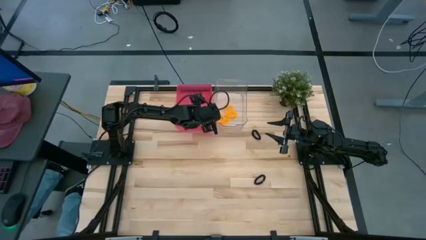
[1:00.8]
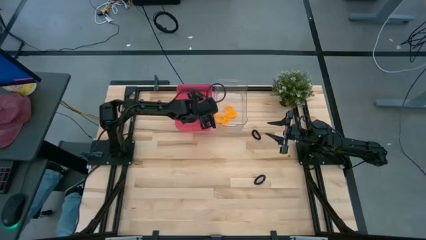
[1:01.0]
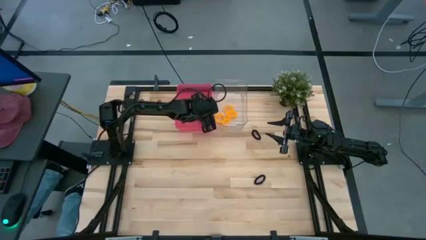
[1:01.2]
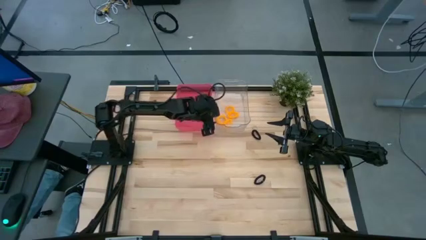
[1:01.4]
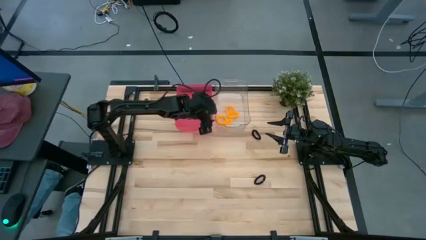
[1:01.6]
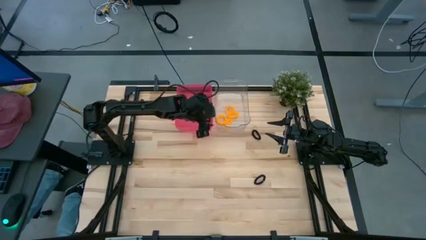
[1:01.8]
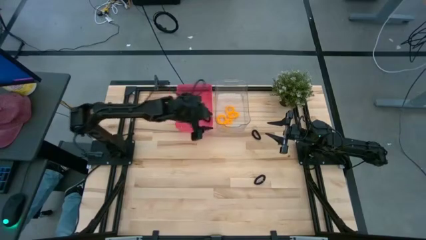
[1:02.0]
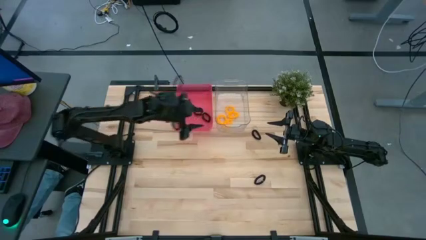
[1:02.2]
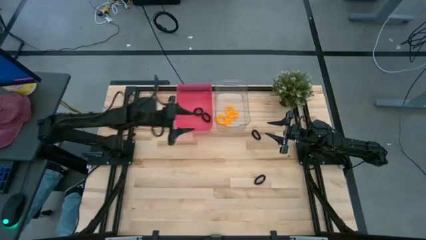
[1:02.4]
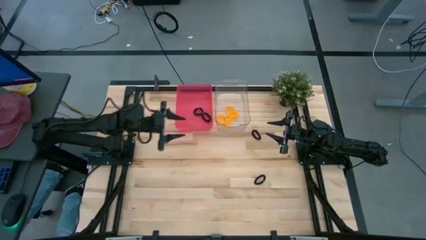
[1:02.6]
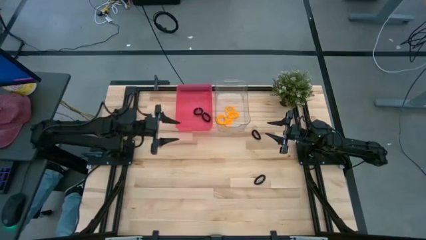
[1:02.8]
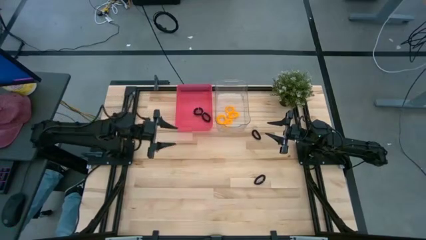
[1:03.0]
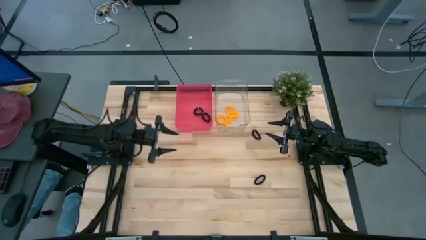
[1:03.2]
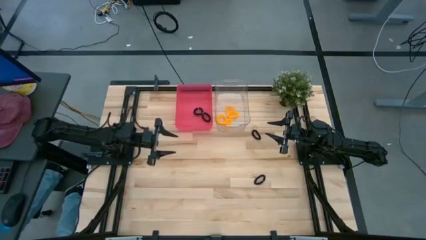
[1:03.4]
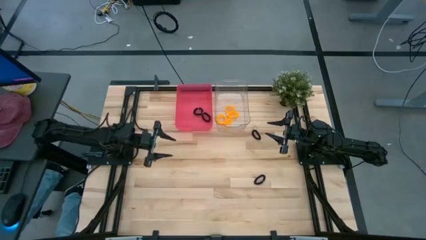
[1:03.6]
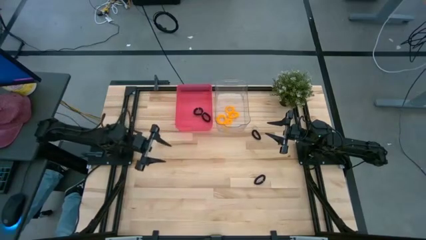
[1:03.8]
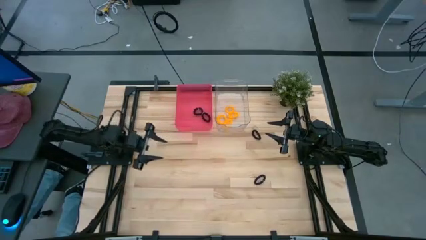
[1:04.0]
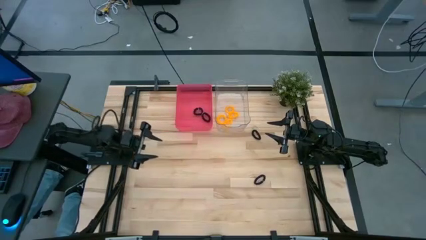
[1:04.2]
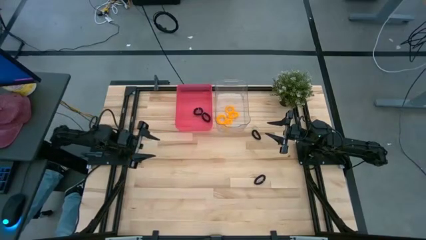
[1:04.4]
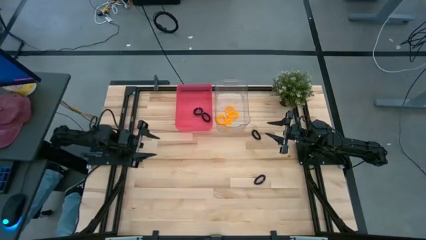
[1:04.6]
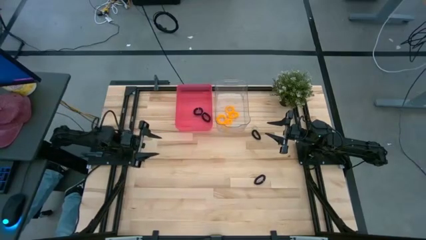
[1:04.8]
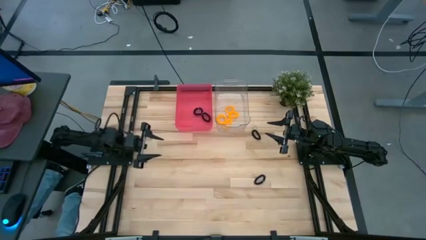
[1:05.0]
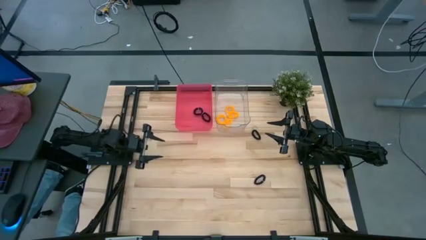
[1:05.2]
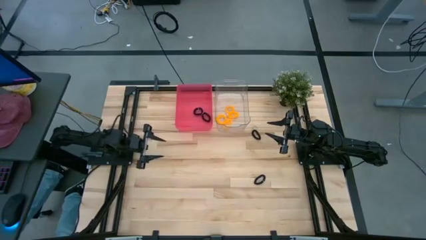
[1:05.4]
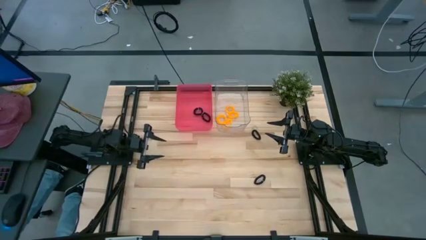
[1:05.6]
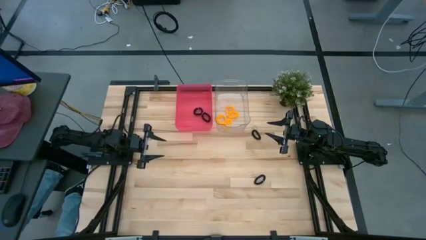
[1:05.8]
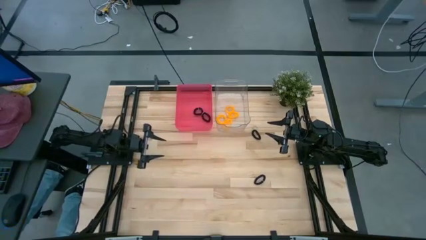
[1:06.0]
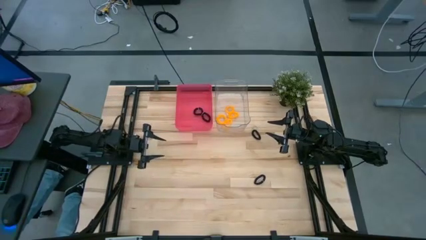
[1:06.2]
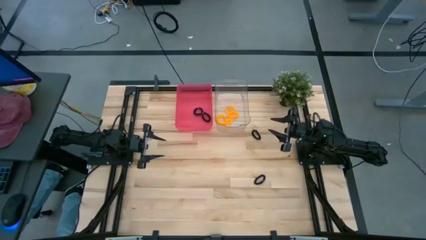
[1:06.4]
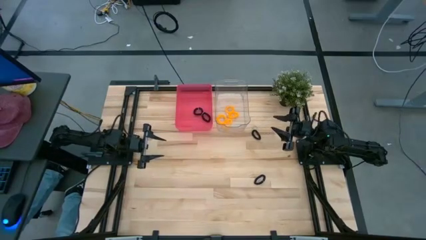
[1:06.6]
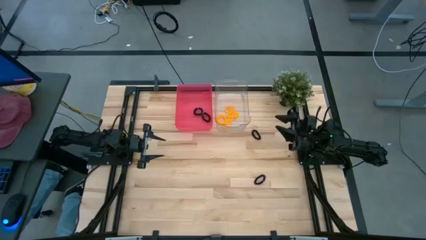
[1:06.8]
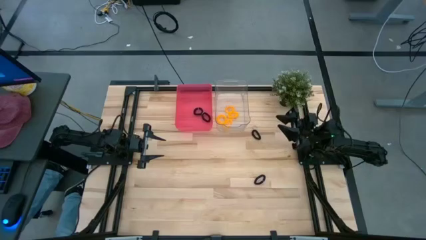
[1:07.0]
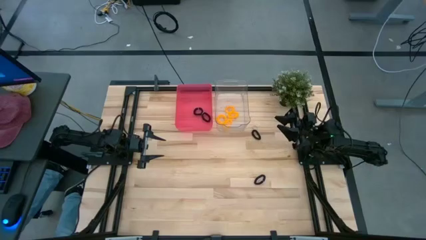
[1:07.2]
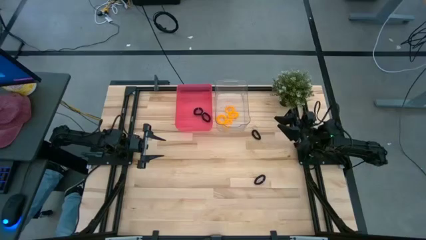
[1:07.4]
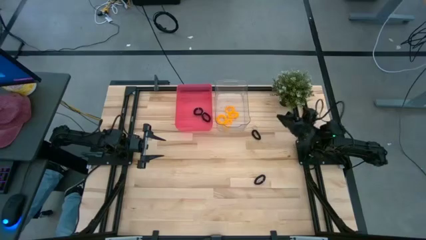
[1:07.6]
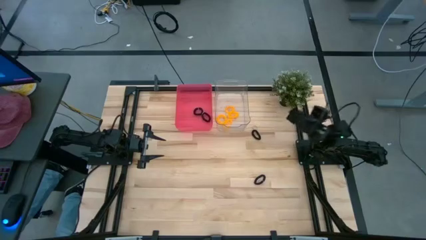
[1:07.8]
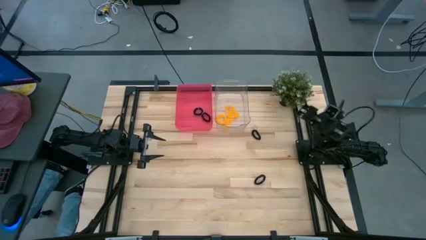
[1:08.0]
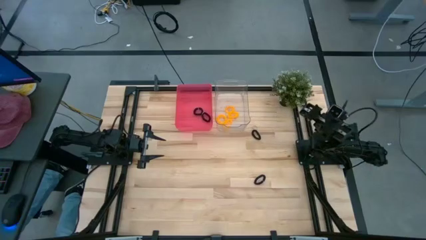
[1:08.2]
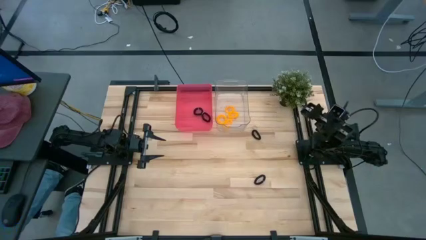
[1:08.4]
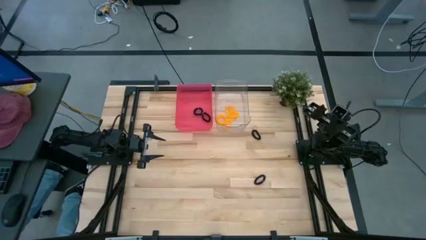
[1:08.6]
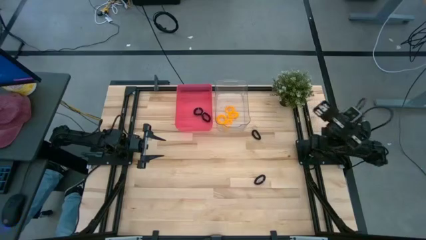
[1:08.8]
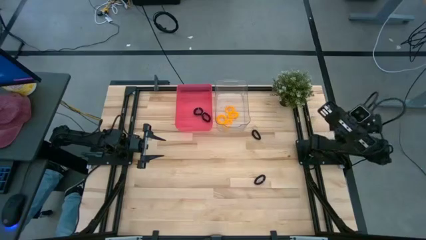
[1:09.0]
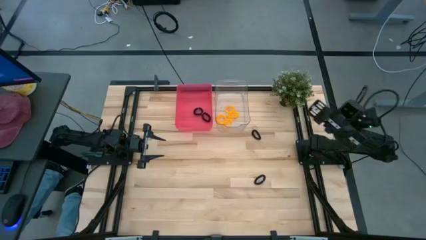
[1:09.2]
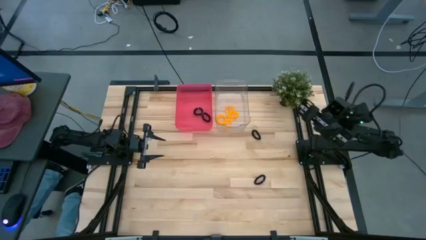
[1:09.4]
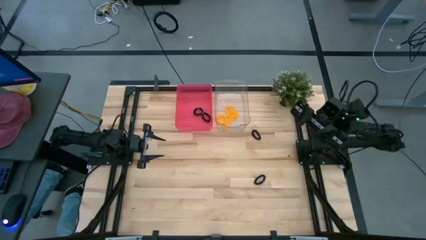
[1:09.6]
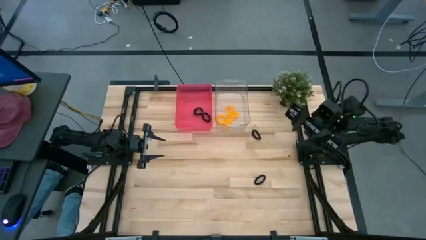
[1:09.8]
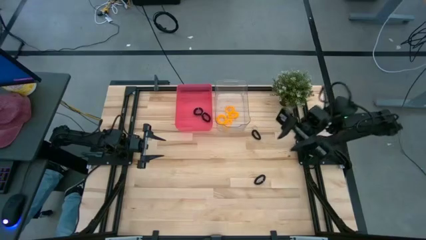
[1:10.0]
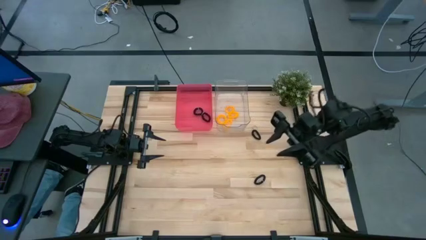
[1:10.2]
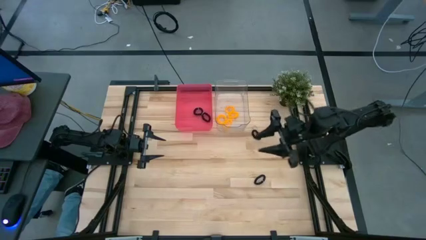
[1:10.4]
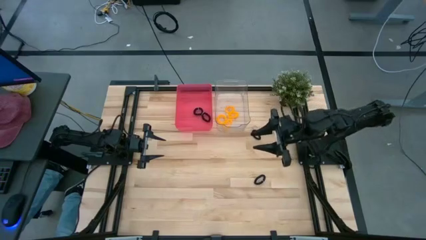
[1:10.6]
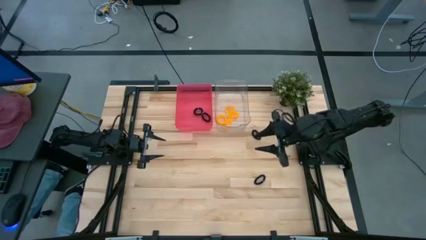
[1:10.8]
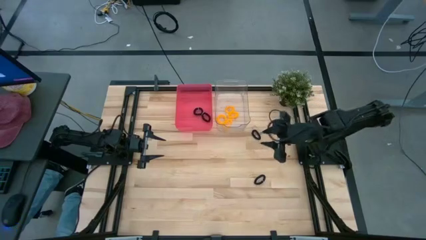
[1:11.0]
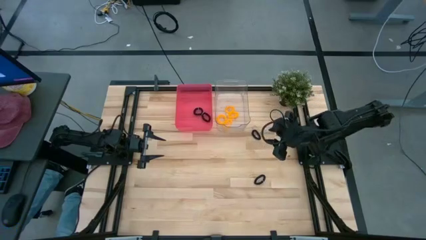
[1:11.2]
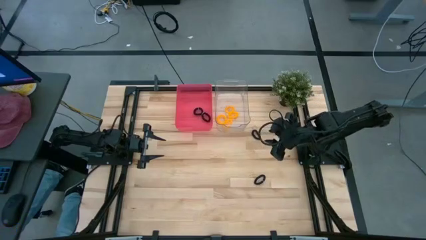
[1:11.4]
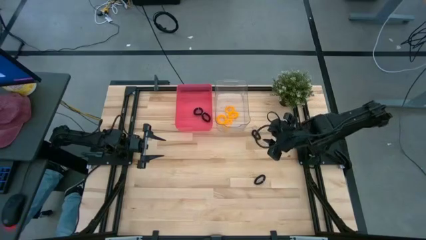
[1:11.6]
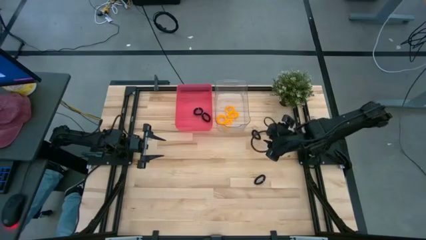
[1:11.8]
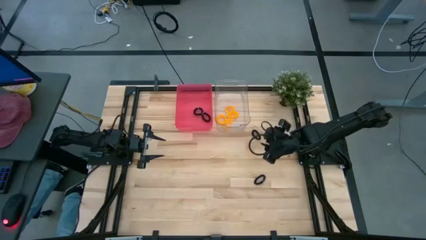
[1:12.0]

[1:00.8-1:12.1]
Task: Sort spring keychains
Put the black spring keychain into the red bin

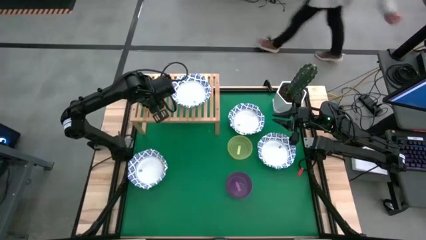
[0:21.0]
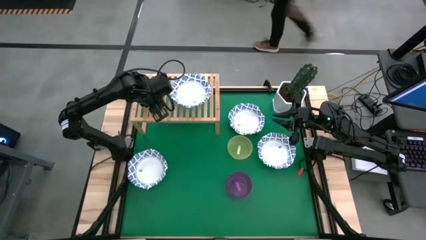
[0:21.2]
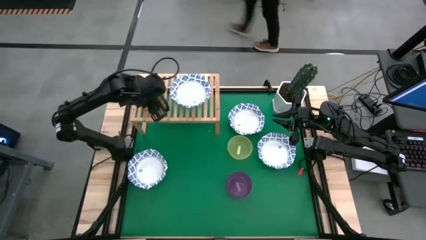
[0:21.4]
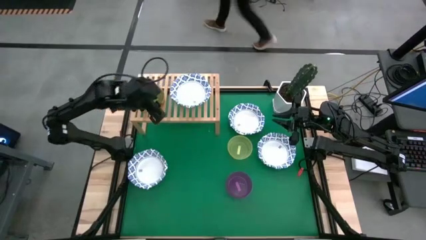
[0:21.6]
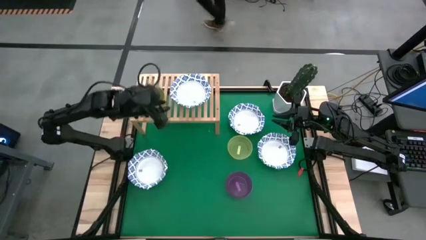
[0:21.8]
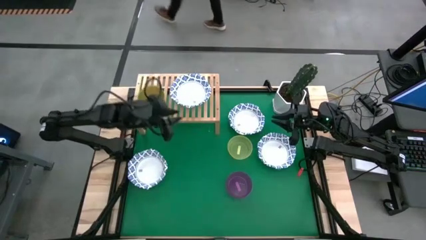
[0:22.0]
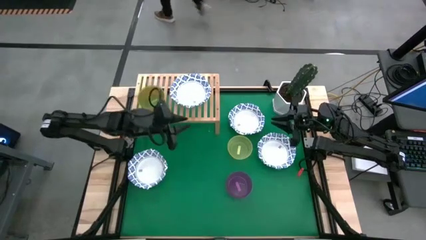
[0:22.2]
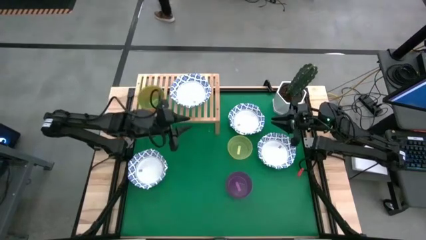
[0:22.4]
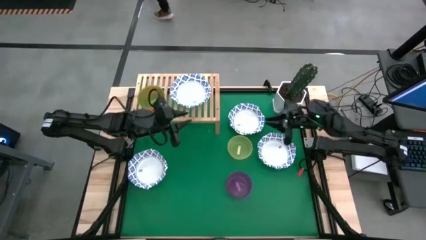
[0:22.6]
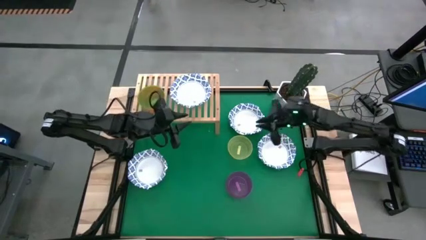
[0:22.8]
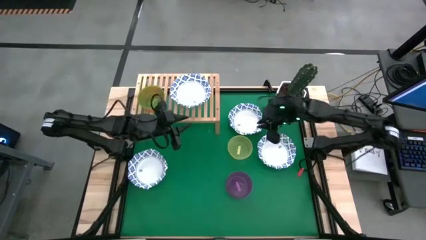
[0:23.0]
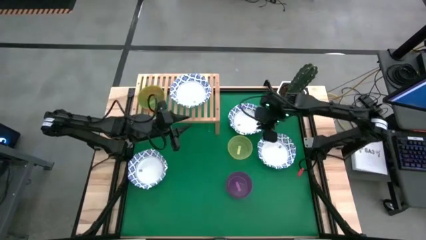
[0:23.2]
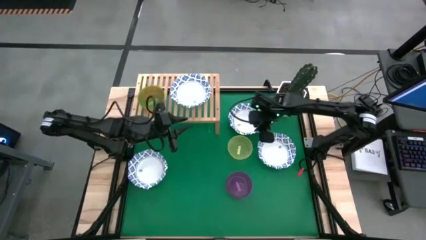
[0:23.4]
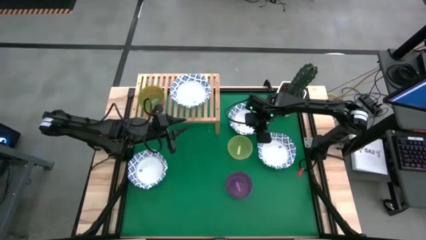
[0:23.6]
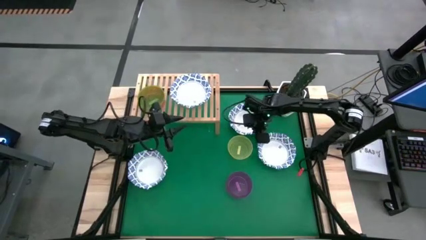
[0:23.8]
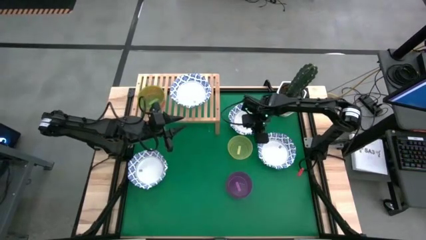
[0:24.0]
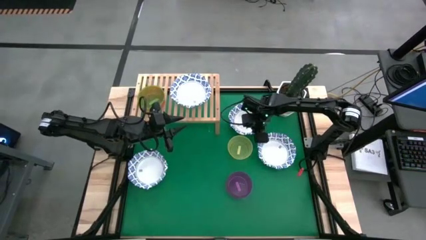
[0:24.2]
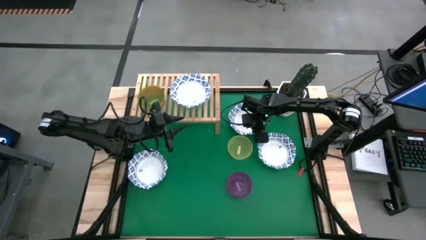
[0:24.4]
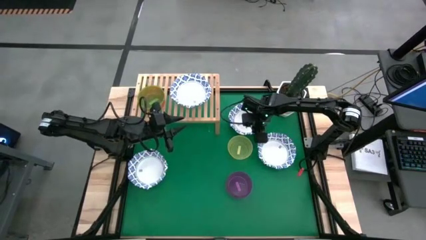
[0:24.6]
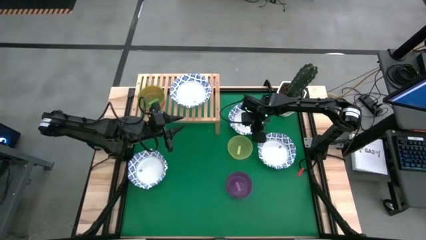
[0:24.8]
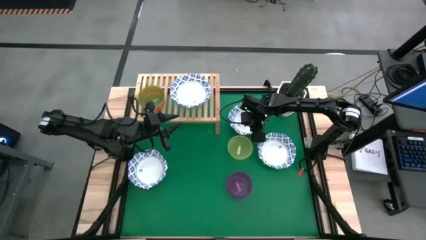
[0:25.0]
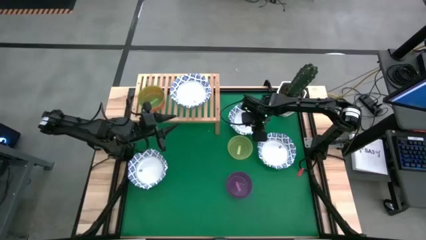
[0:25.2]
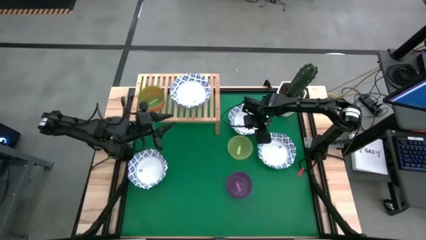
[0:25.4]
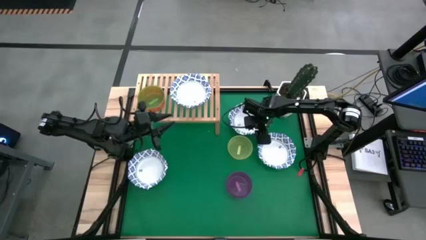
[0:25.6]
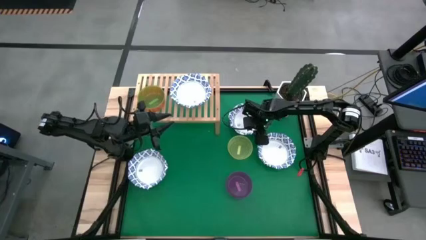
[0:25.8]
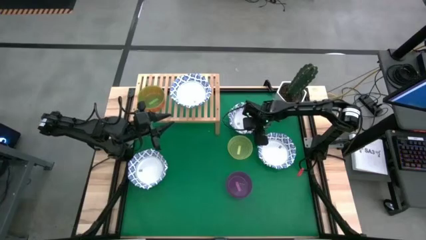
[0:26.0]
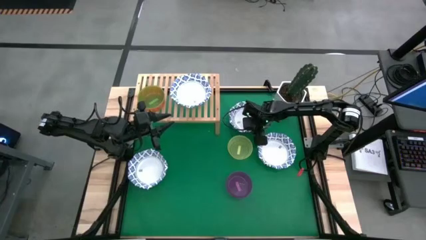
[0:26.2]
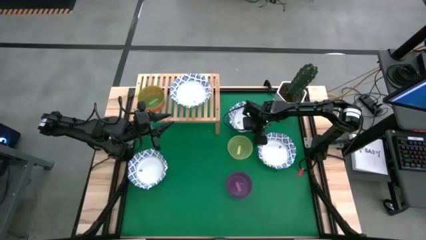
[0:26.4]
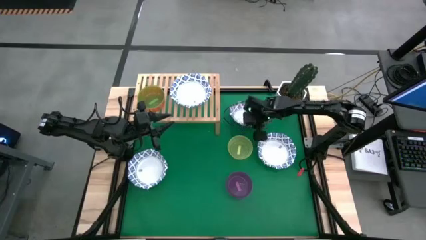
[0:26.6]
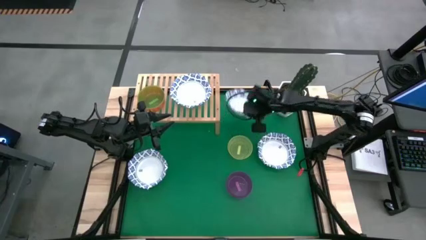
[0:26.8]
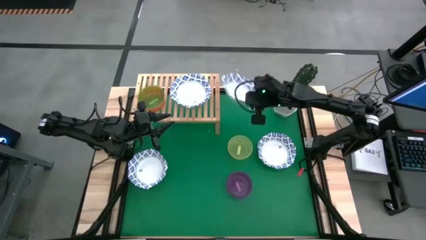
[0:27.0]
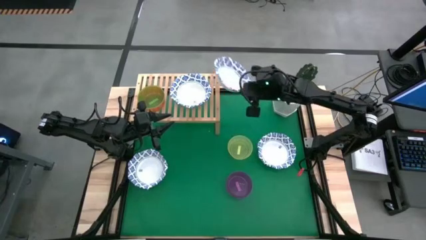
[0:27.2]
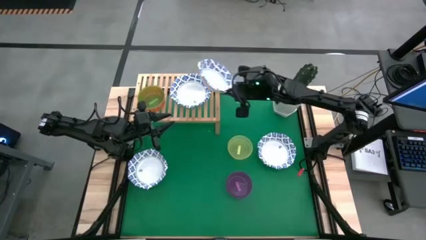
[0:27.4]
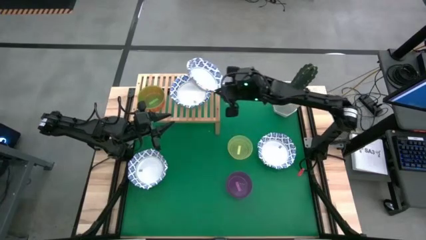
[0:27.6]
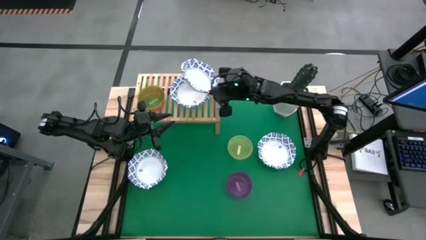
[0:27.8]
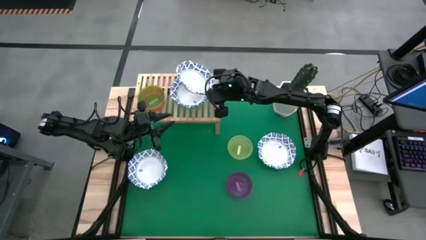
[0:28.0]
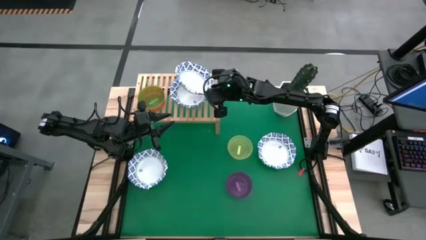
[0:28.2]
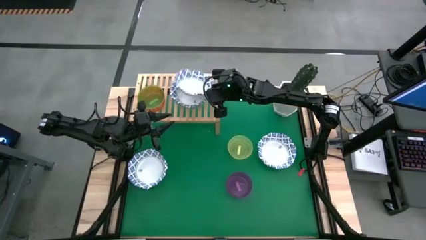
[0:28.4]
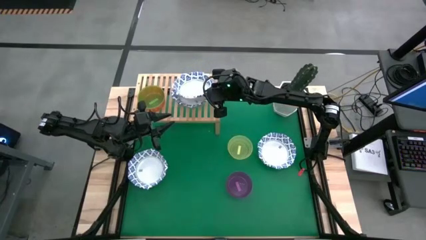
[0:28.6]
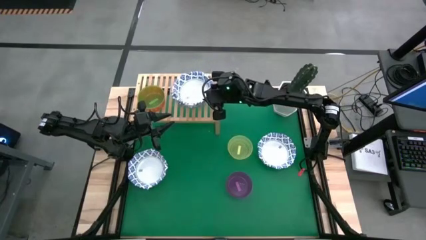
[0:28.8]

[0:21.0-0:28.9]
Task: Place and stack bowls onto a shelf
Stack the blue patterned bowl on top of another blue patterned bowl on the shelf
